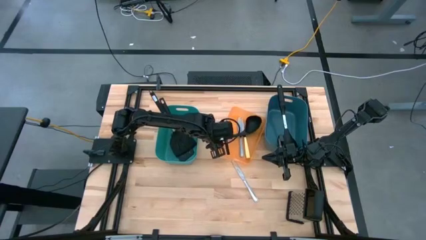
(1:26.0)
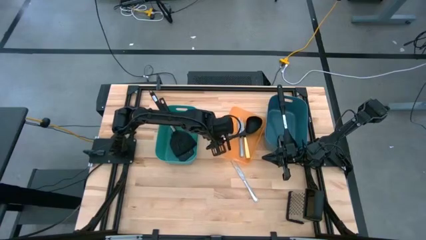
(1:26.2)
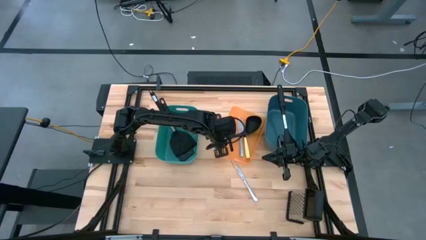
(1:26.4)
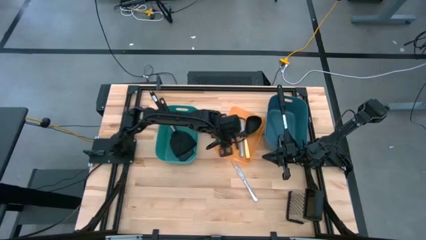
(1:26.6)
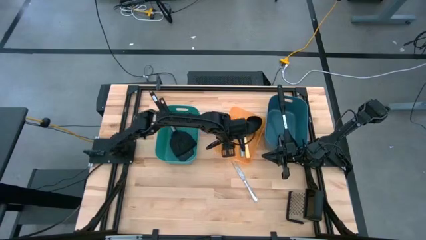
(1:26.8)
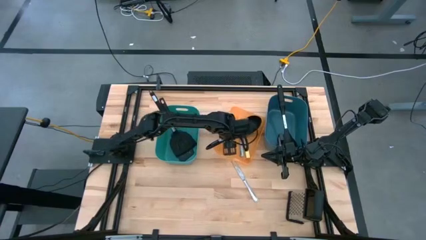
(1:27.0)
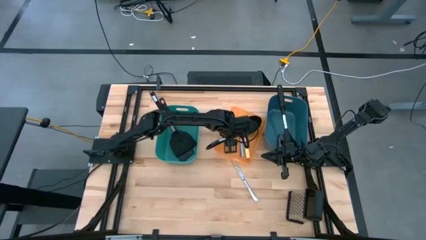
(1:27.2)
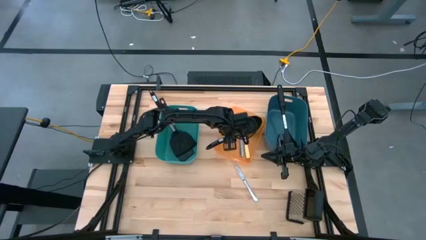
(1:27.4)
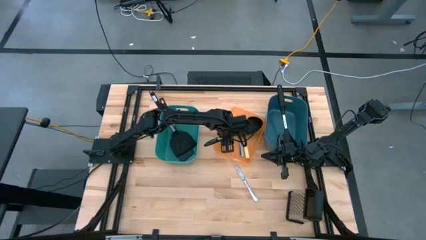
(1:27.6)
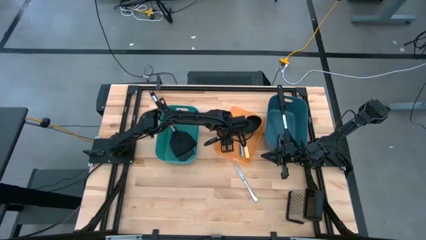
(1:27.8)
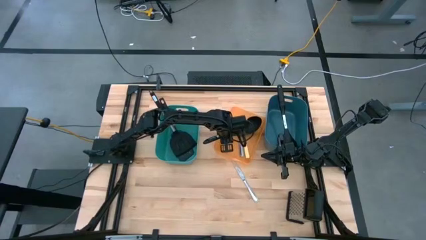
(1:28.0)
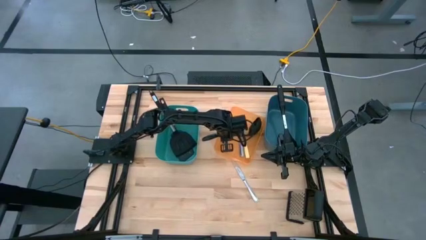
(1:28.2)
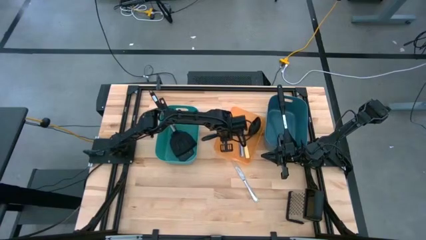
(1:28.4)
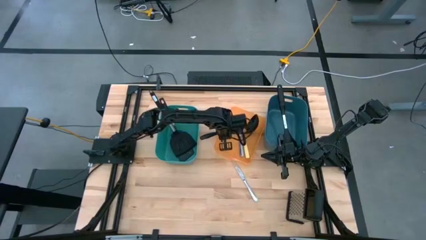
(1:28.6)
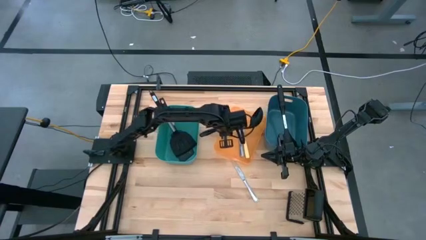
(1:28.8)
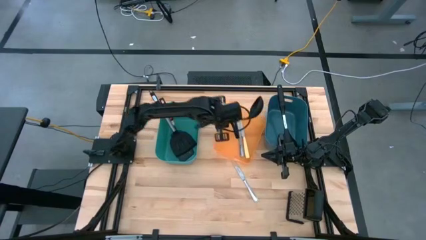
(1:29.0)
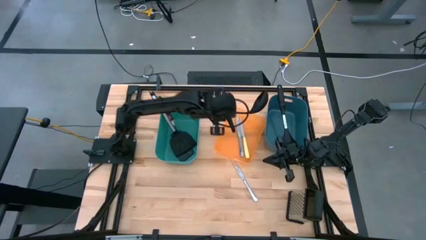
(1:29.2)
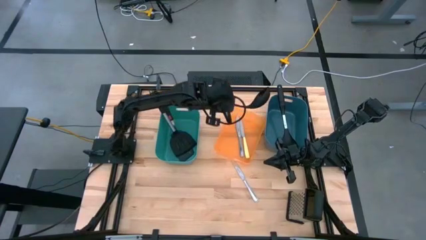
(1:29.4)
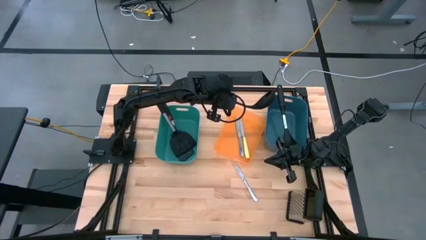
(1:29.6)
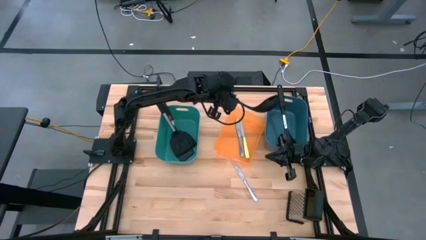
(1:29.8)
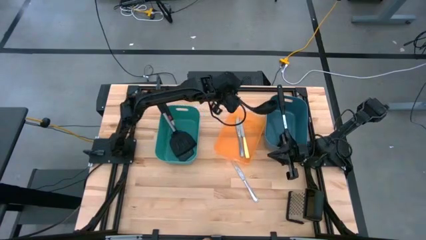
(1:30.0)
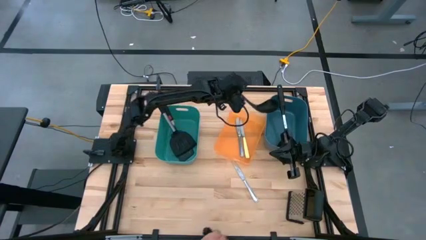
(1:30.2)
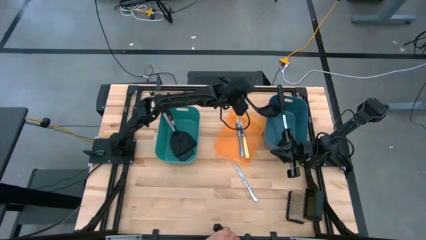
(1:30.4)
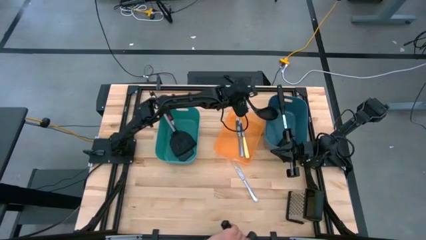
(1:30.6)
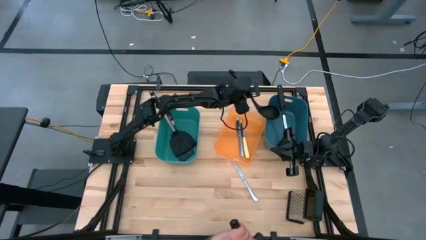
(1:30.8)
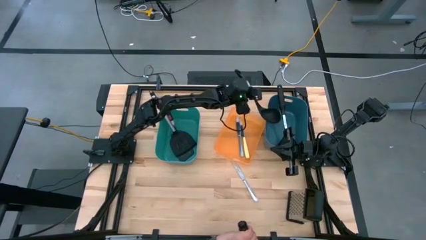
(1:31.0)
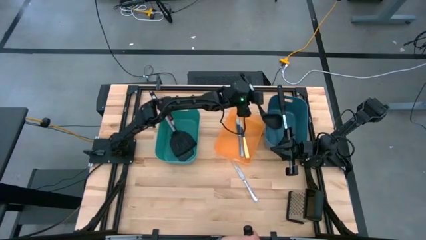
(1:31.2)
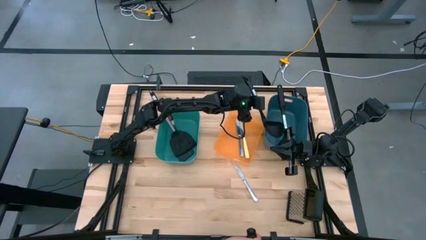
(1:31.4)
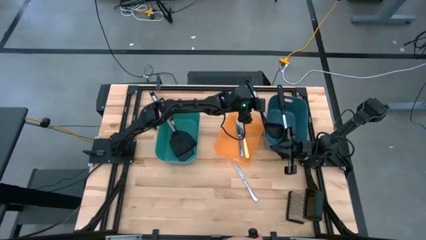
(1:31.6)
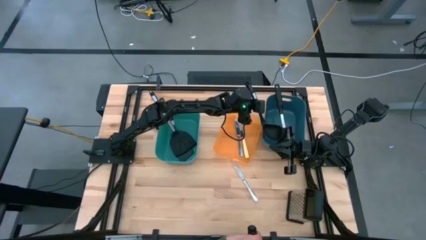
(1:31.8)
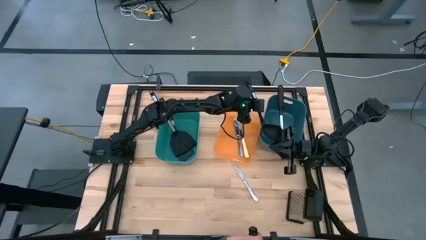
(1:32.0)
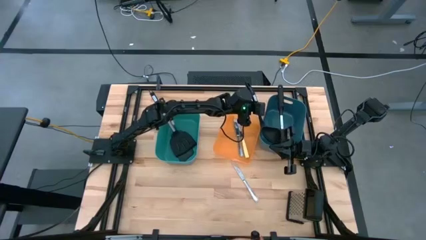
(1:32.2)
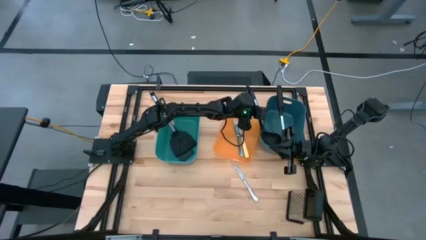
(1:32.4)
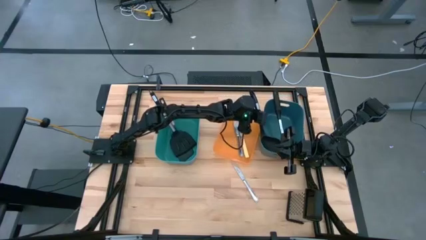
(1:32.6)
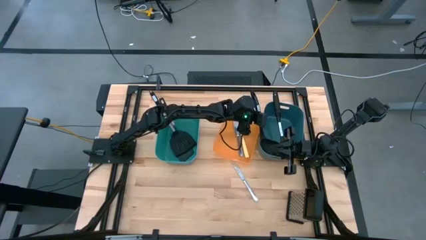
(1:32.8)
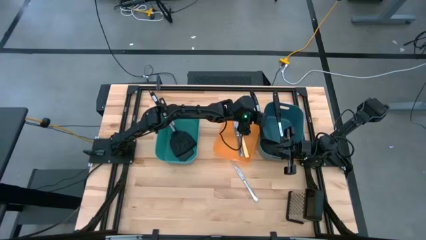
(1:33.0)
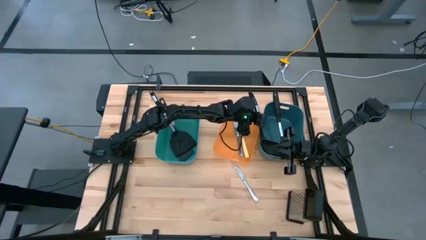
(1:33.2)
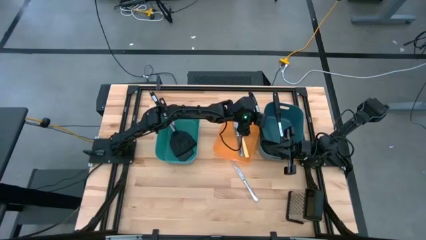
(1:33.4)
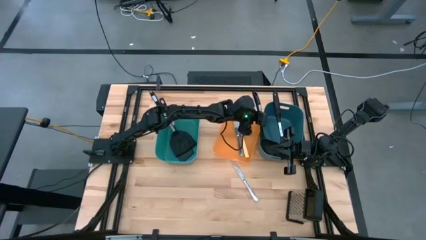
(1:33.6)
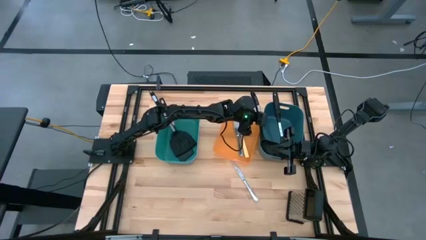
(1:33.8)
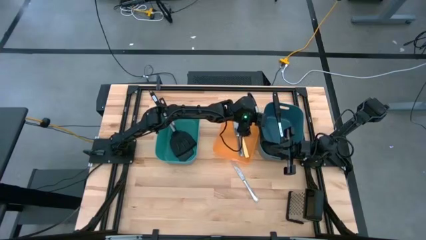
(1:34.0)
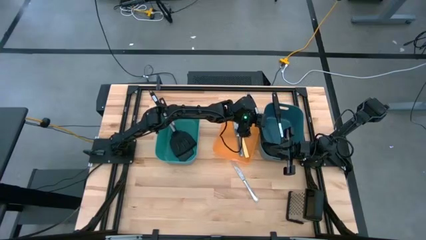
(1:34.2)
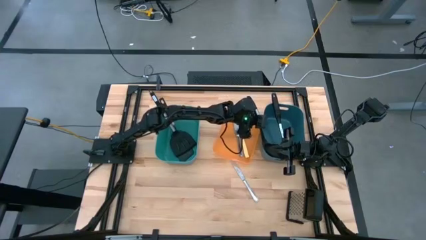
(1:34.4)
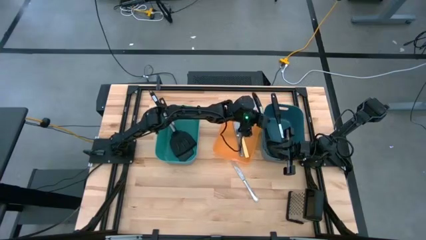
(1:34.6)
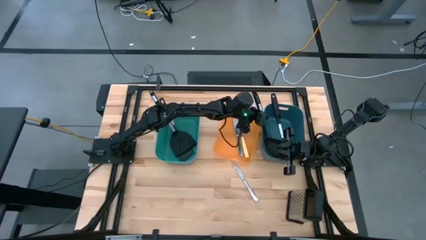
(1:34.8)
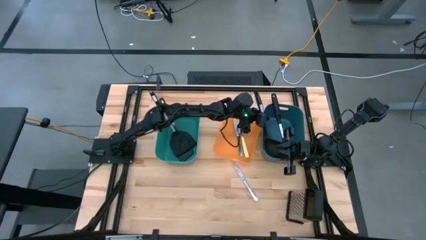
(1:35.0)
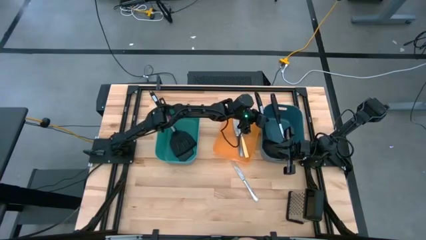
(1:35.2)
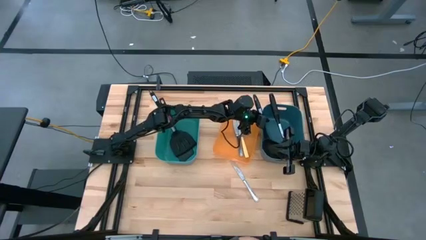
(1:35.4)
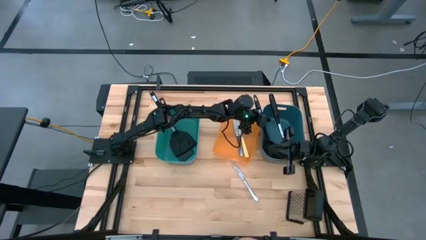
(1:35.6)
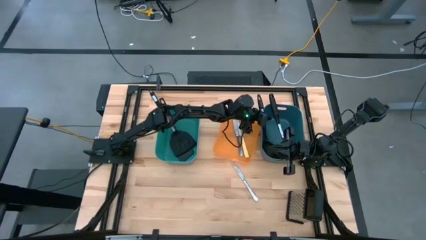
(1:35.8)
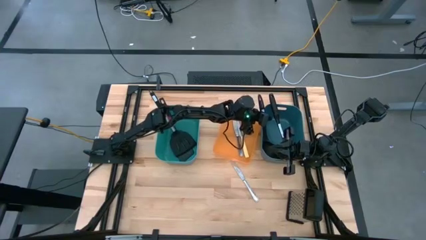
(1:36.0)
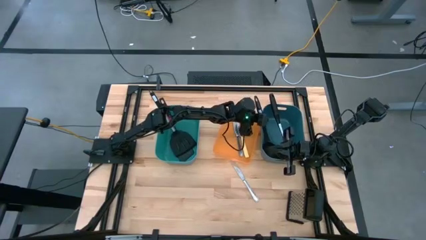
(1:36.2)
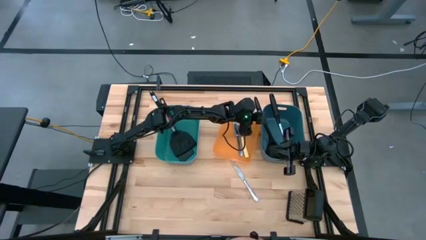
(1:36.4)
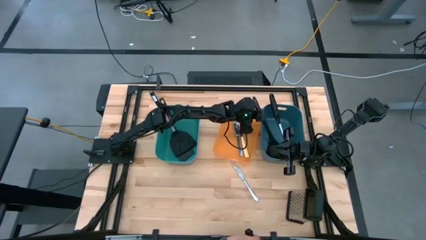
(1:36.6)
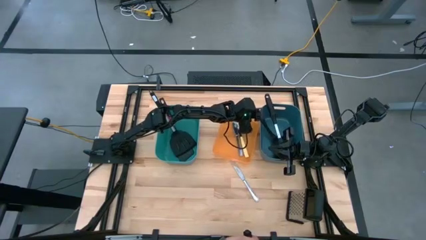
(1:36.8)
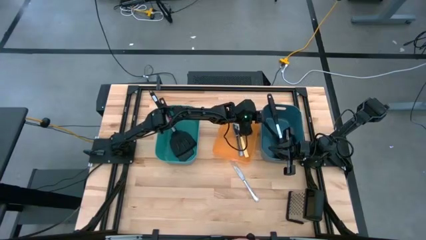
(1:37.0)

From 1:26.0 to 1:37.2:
Task: Pick & Place Kitchen Items
Put the black serving spoon into the blue bin

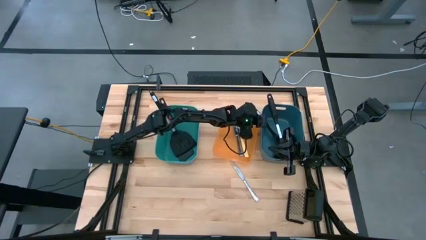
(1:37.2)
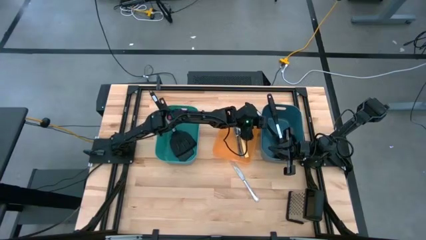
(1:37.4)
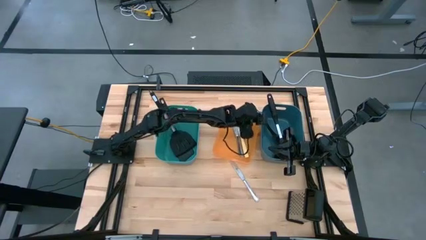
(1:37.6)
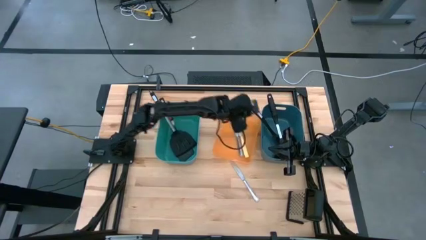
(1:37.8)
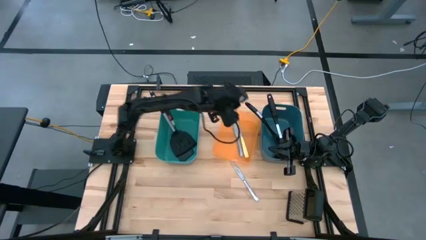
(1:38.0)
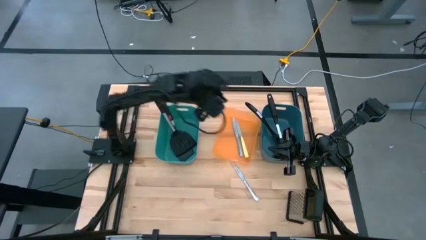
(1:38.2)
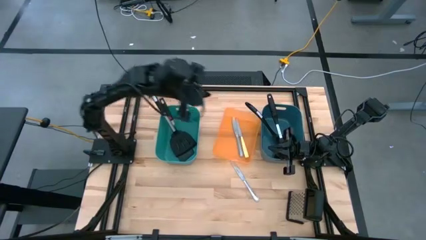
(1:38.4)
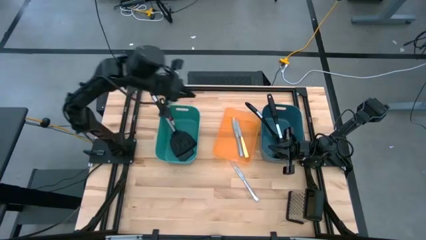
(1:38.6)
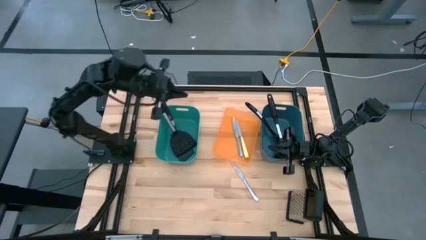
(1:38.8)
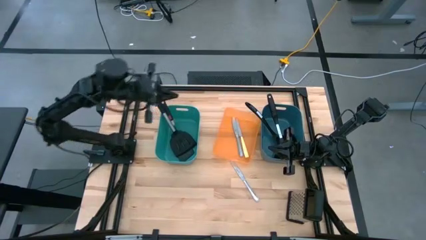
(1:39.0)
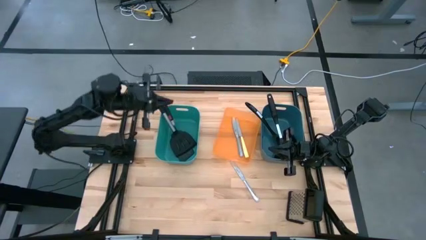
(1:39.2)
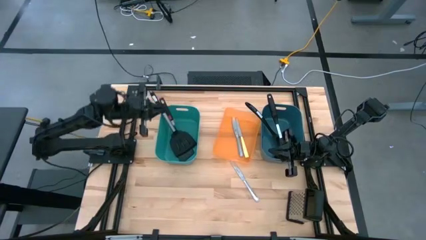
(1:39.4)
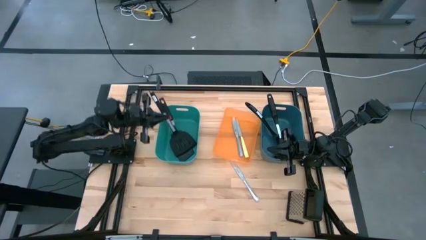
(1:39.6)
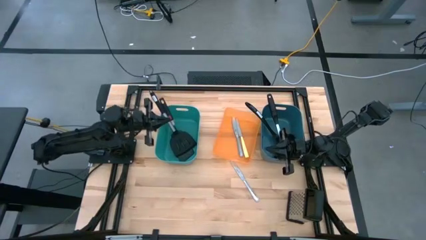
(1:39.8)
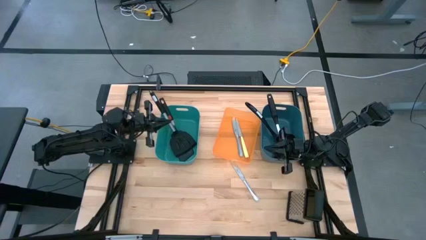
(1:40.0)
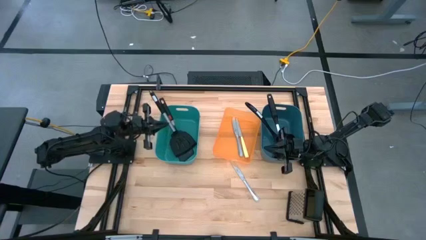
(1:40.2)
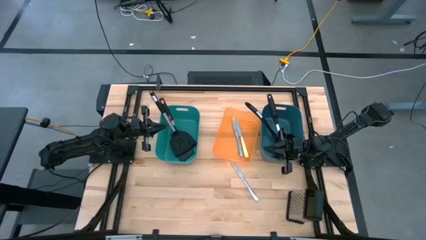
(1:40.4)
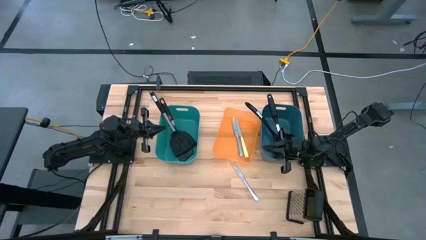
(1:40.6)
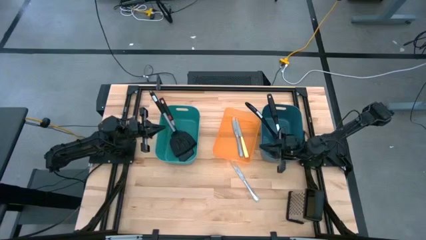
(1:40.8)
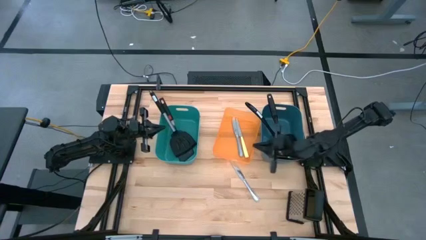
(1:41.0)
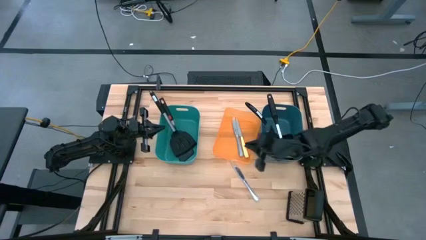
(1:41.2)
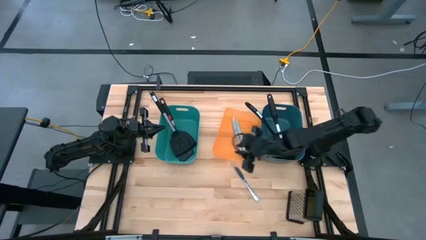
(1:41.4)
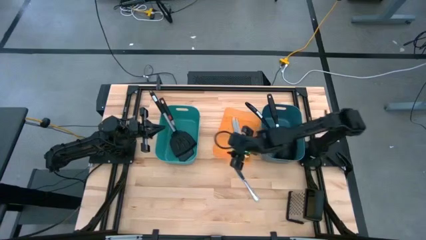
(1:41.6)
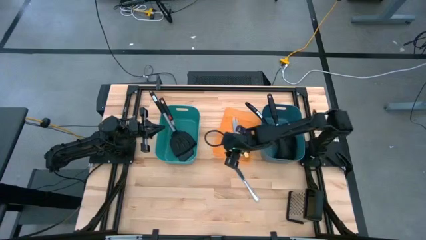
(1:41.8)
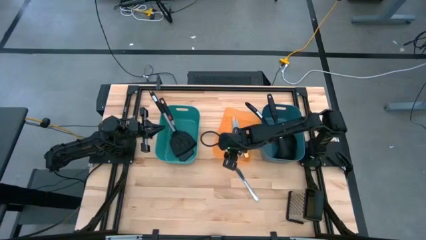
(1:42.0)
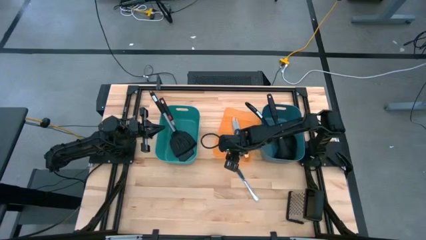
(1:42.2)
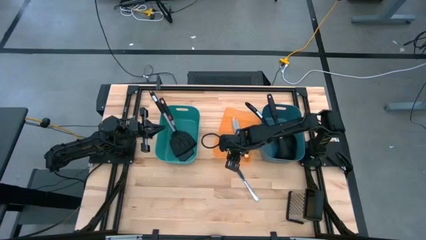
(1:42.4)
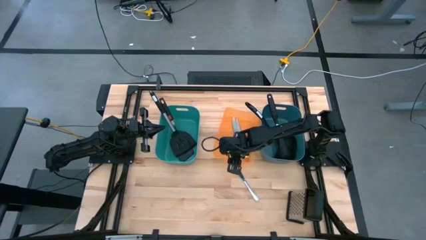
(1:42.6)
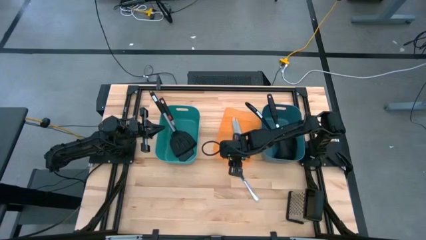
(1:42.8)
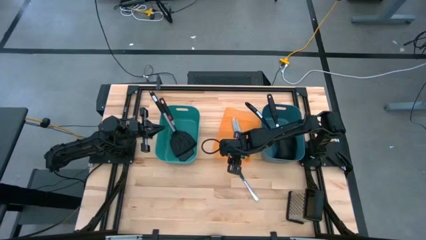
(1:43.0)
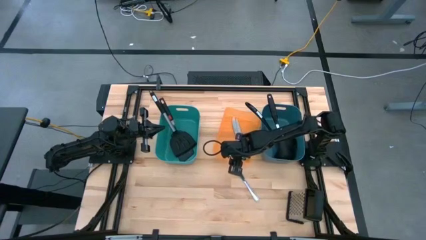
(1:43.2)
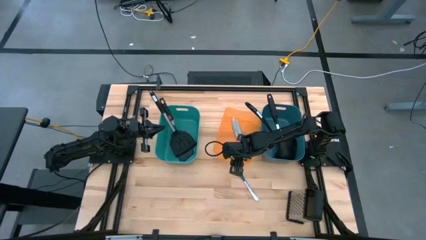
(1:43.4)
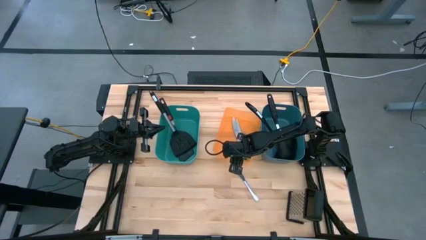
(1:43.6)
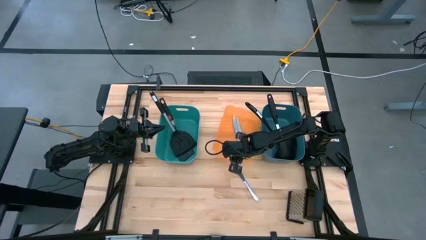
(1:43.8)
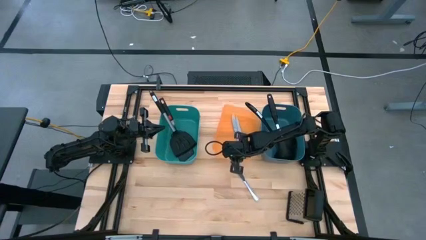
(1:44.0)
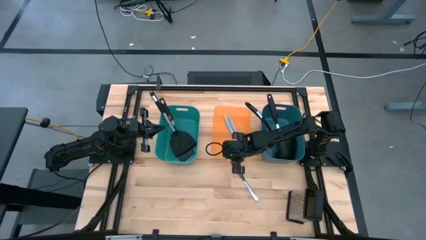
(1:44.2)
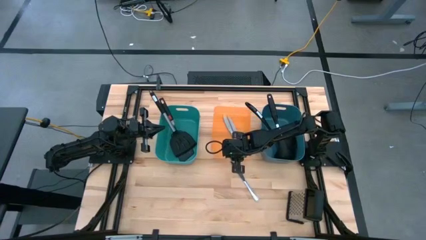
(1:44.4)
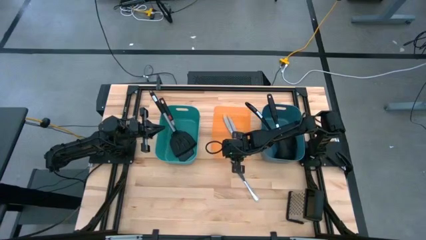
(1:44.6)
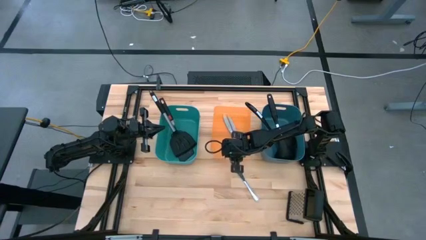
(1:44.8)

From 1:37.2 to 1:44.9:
Adjust the orange bin
